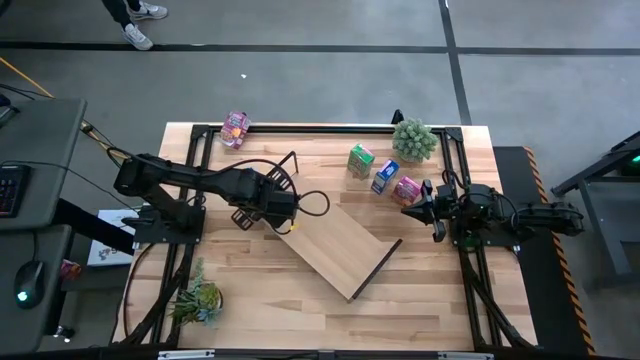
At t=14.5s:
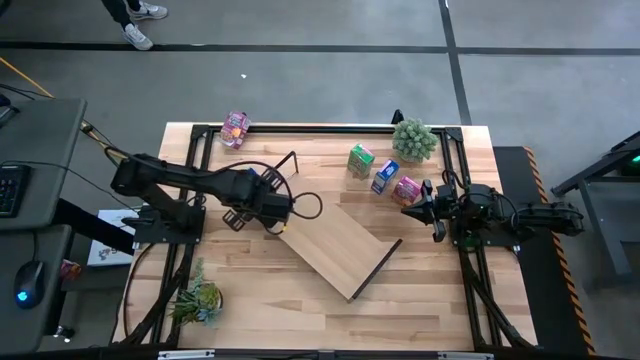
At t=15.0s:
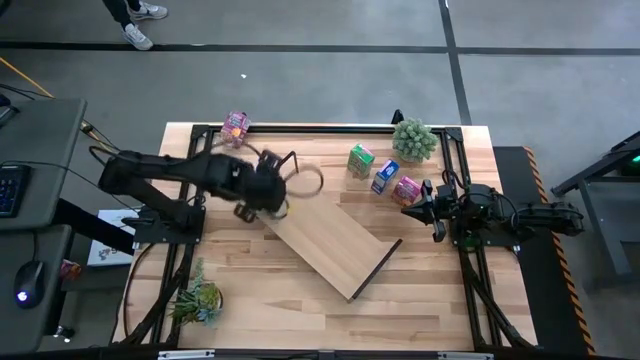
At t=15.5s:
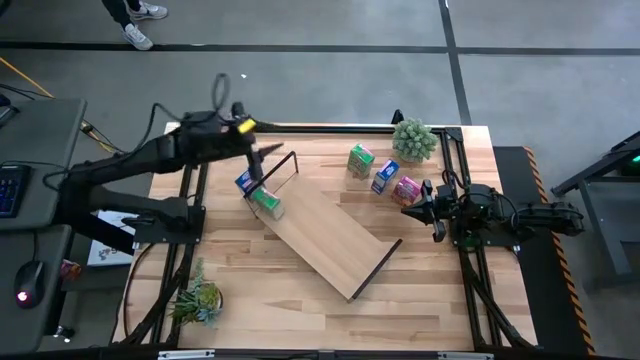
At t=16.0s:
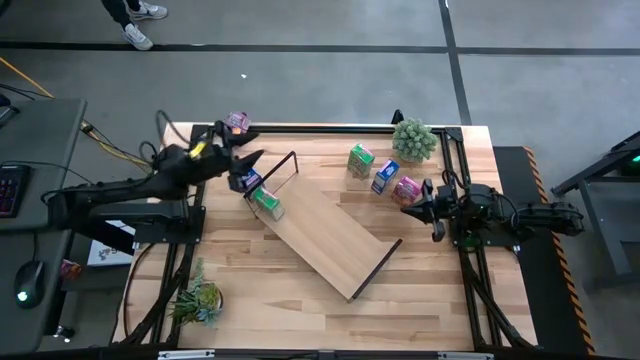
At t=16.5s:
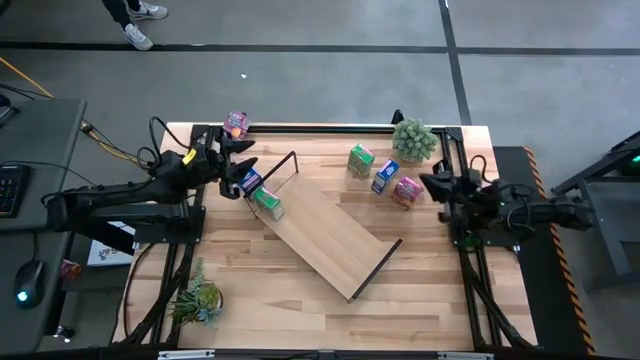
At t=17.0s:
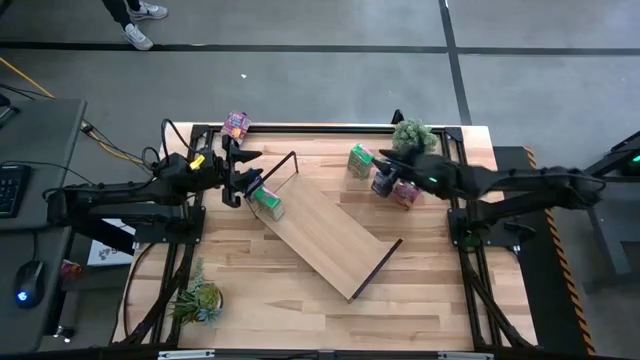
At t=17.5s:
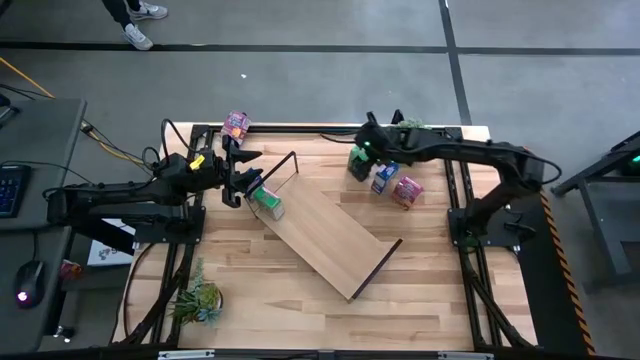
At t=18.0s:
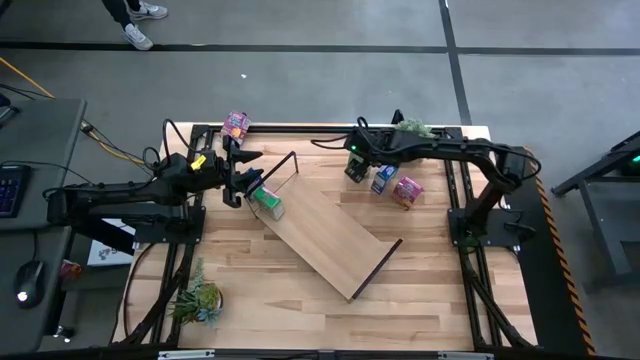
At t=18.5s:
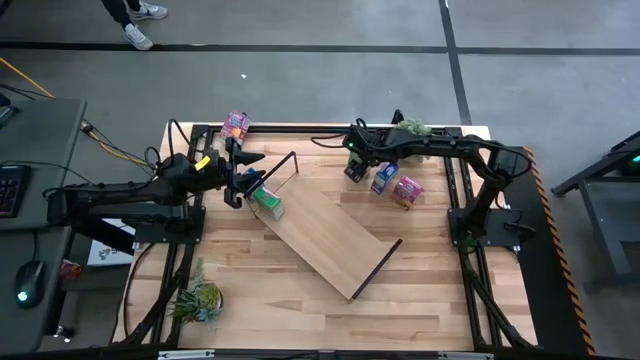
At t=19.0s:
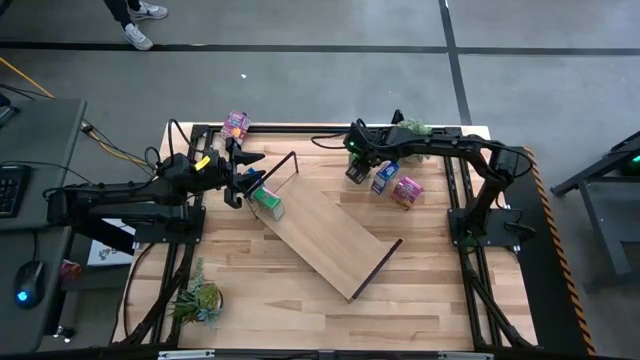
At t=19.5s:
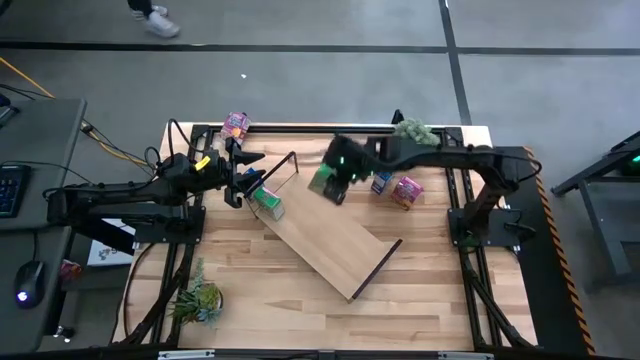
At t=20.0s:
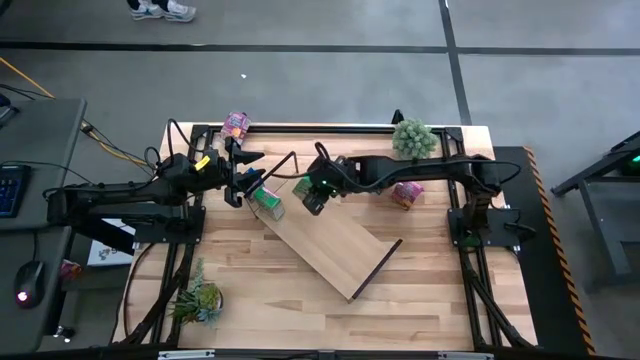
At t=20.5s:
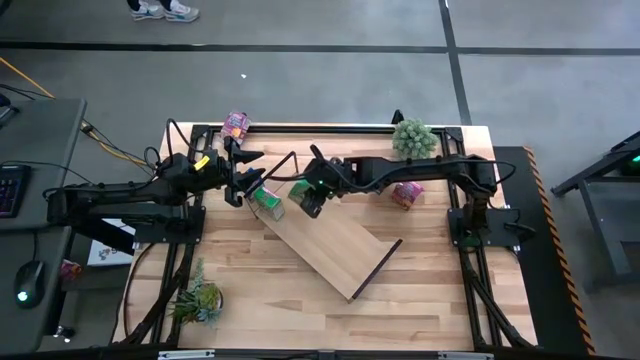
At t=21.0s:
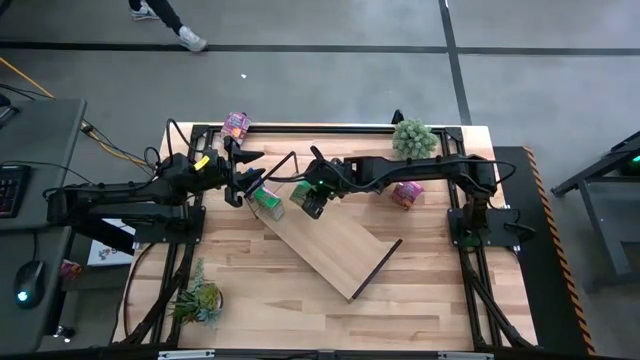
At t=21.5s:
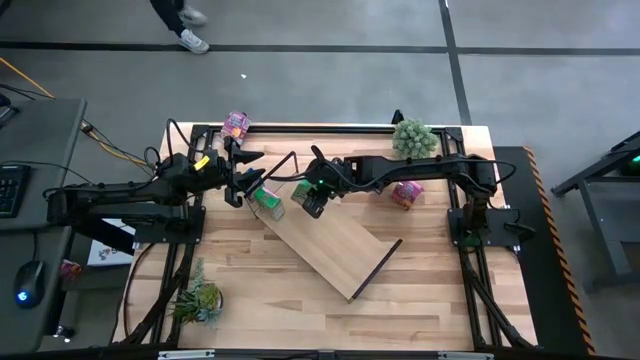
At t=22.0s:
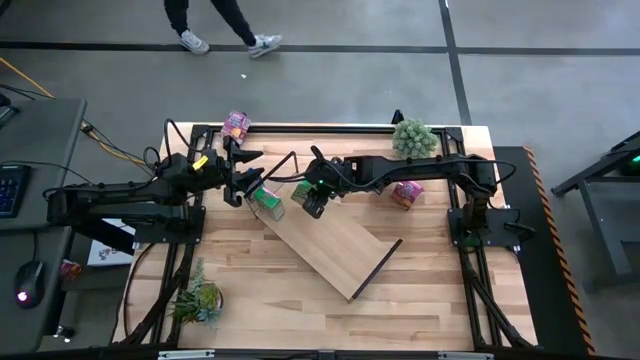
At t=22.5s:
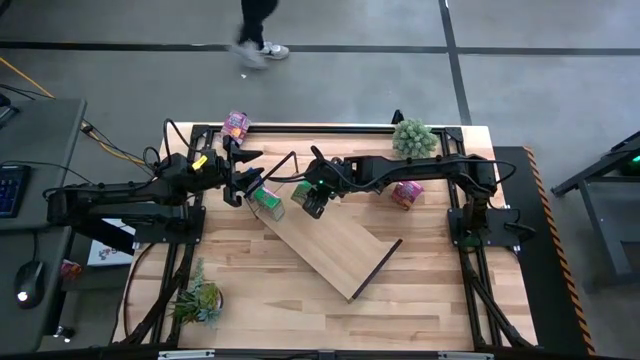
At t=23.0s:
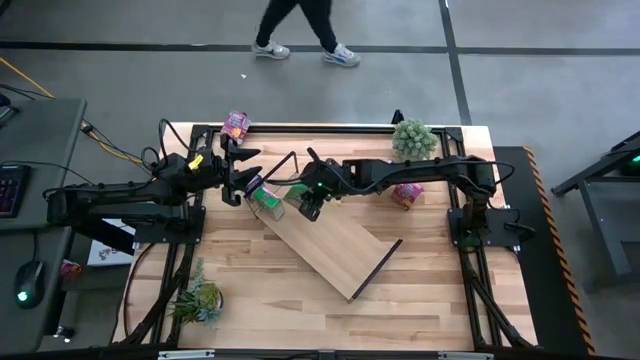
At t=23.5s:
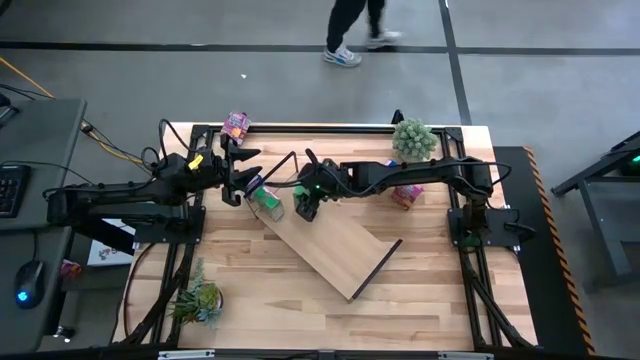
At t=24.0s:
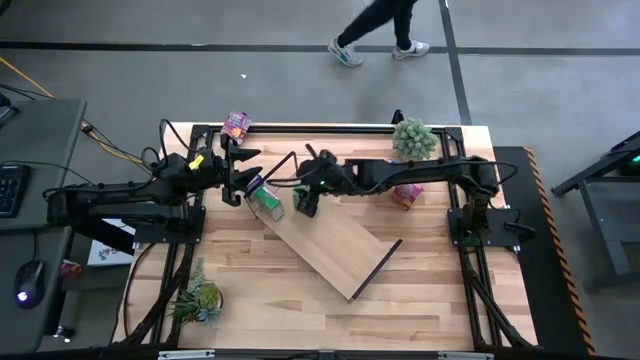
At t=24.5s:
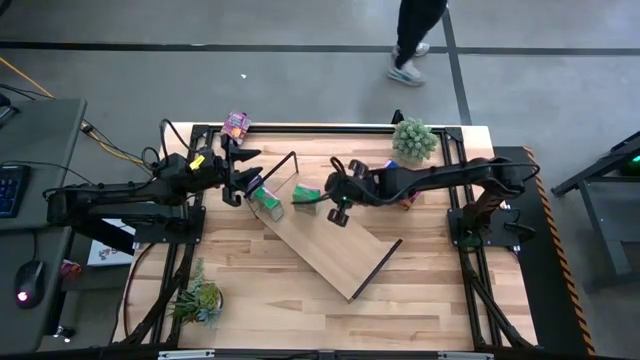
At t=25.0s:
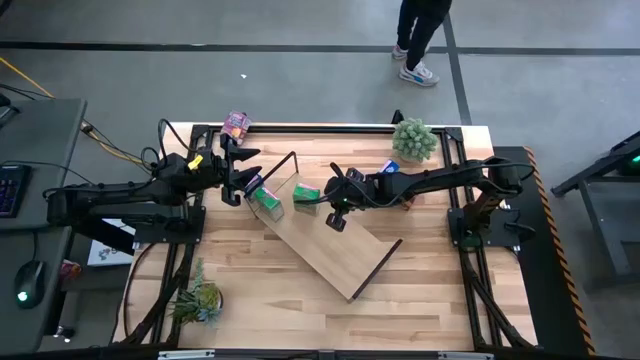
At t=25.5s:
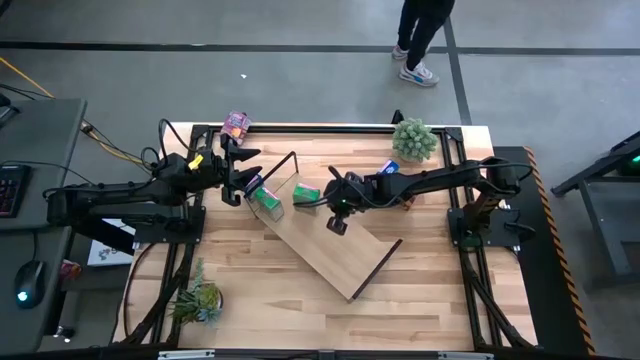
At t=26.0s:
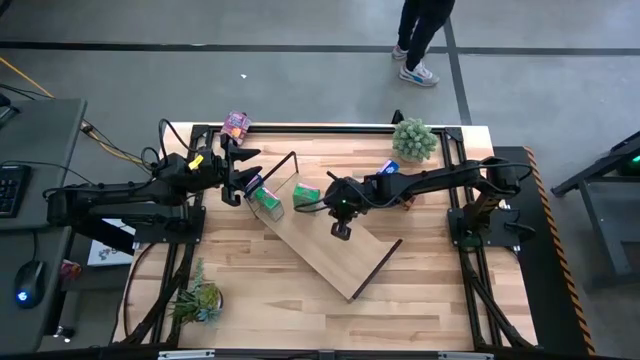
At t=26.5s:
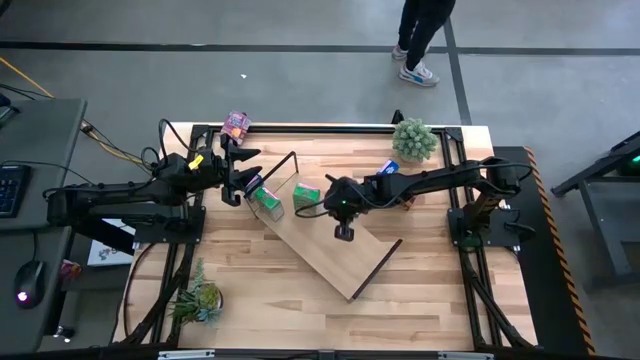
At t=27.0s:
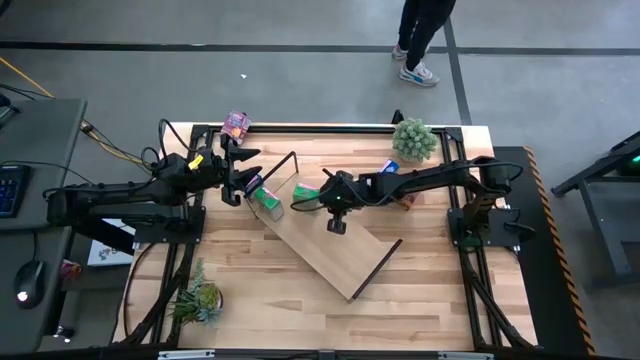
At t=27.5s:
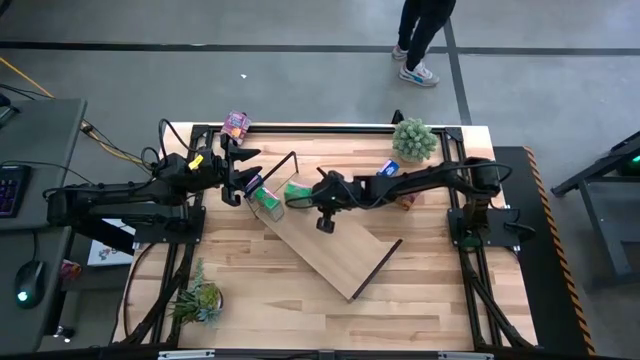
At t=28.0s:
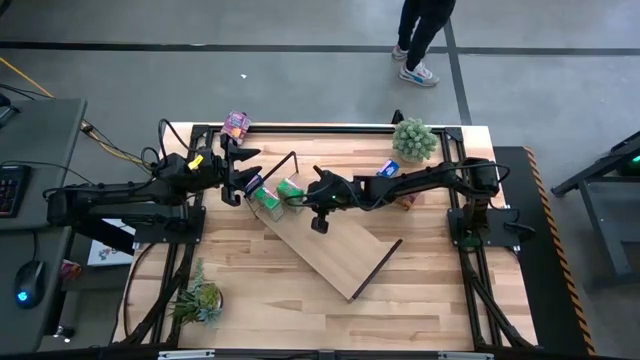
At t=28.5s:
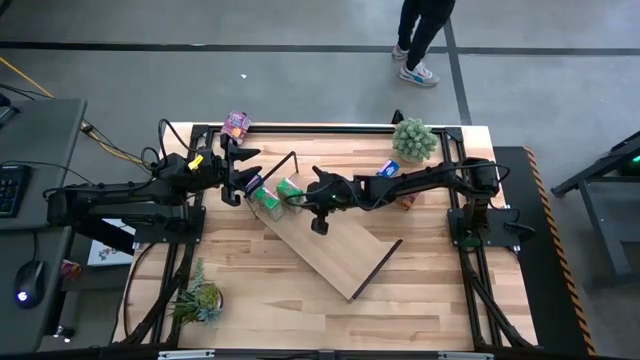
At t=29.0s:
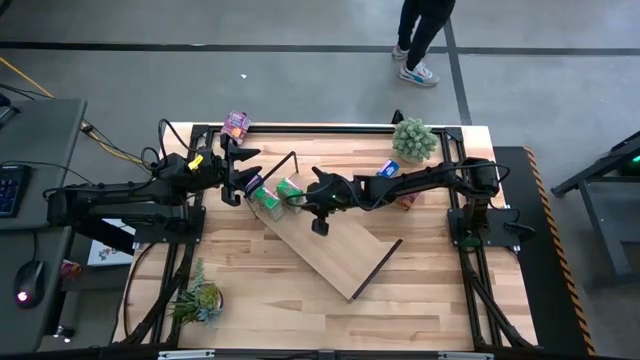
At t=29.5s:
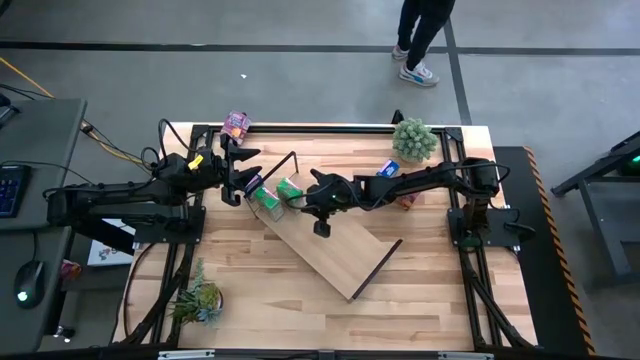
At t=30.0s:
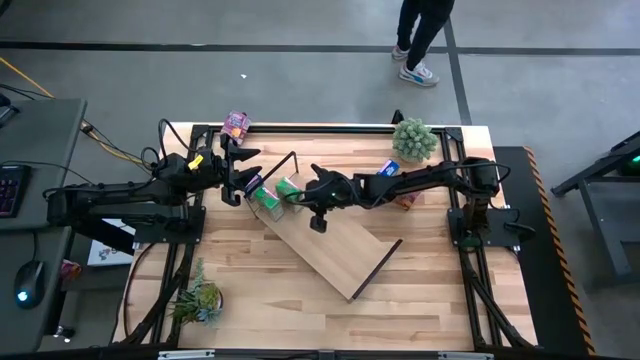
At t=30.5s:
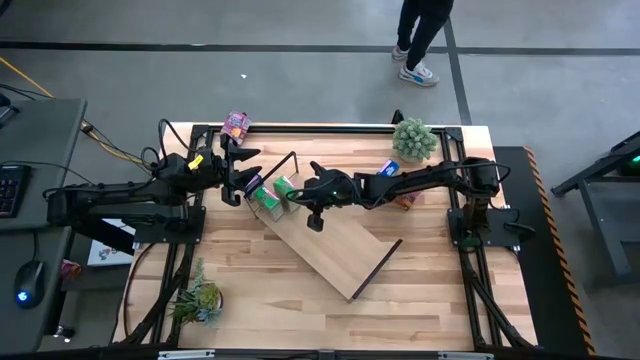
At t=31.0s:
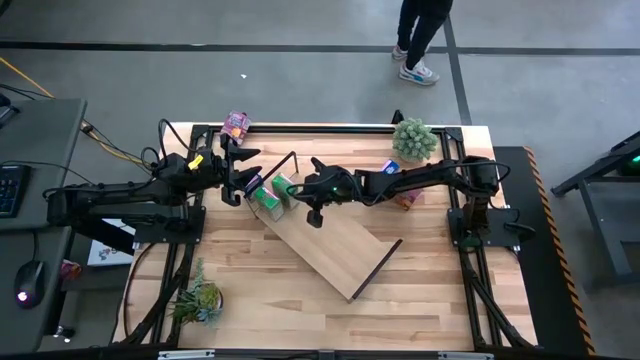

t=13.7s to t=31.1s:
Task: Stack cereal on shelf
Put the green cereal box on the shelf

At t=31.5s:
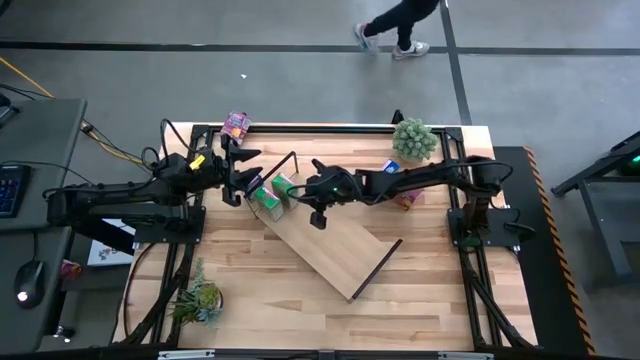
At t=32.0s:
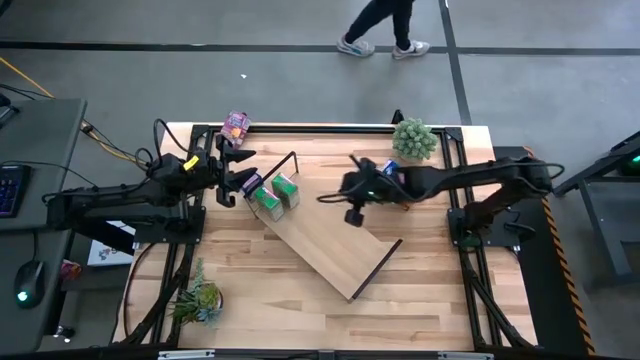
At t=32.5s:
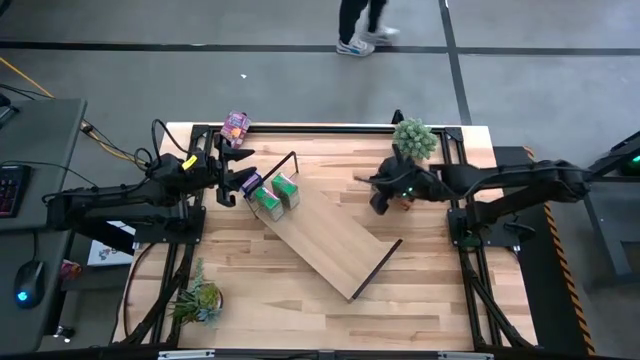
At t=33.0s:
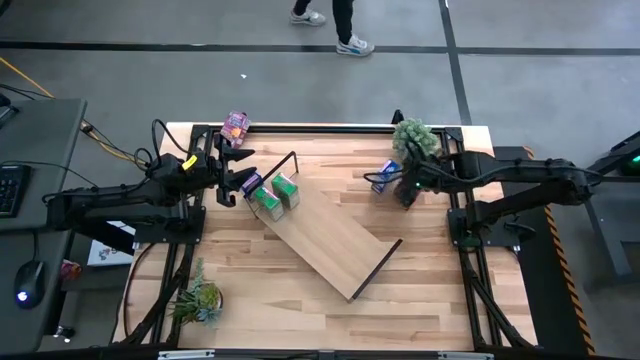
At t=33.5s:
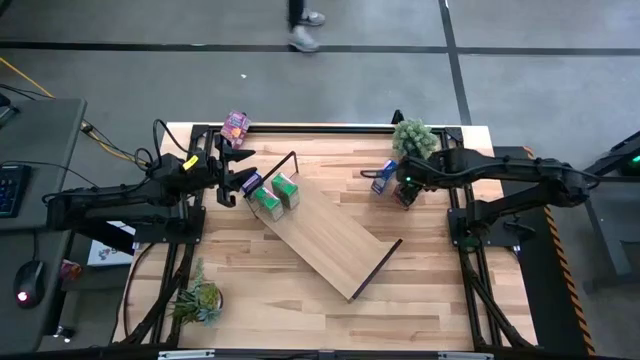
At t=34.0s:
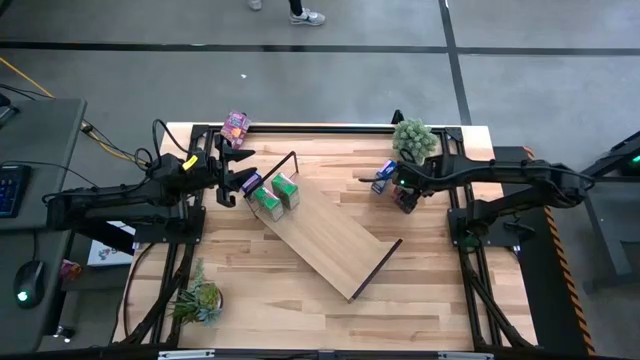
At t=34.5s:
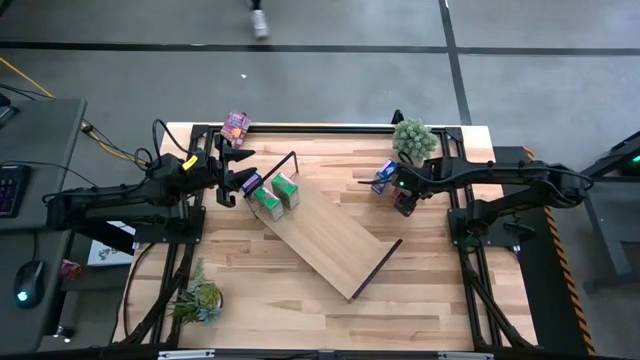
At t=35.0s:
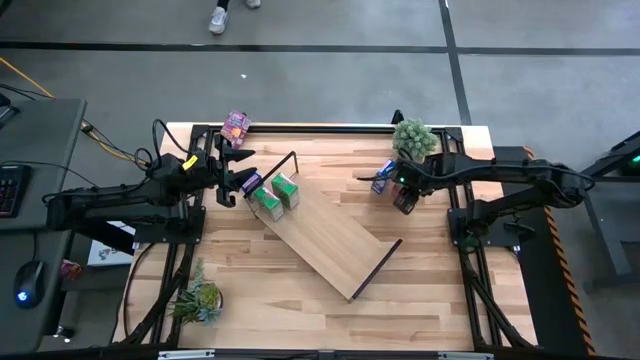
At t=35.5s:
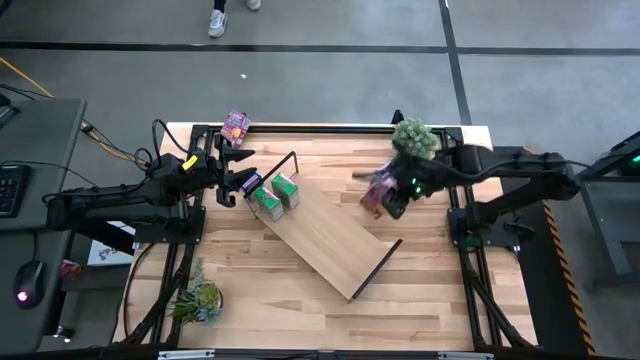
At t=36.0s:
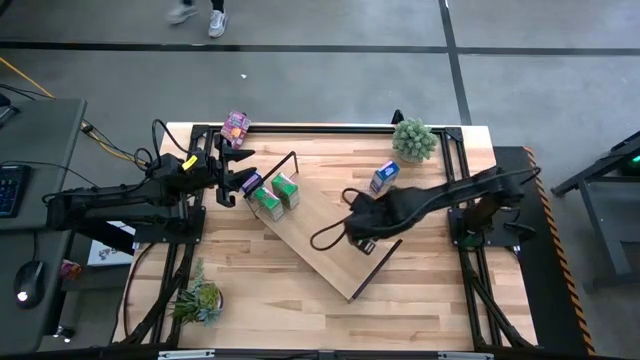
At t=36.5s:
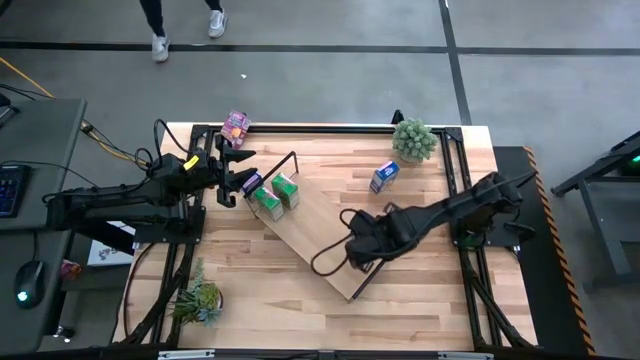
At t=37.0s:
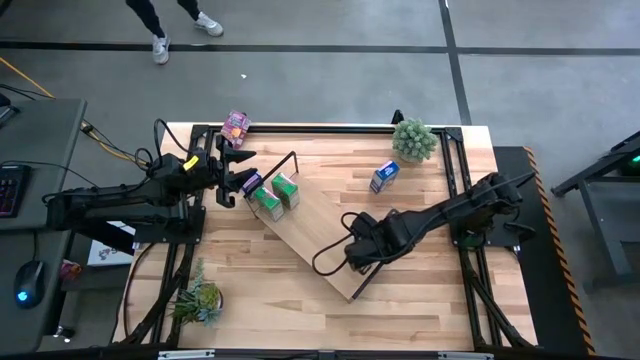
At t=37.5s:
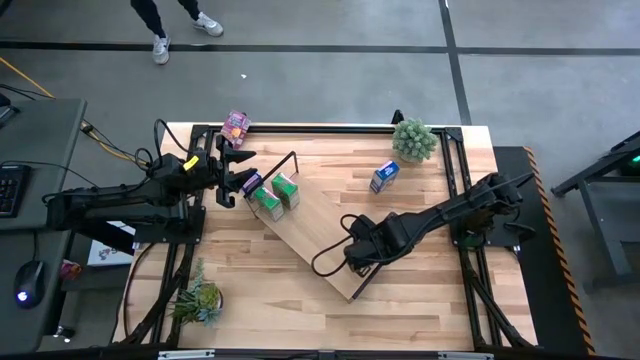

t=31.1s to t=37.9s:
Put the bottom pink cereal box on the shelf
